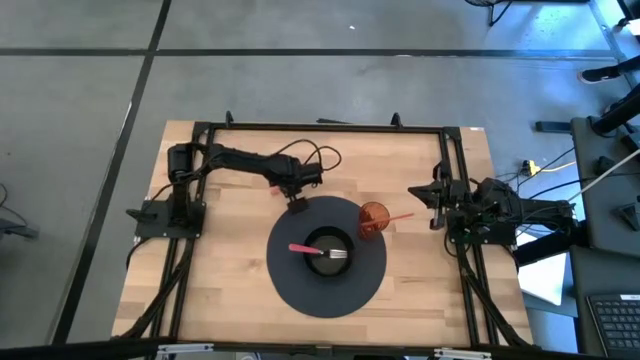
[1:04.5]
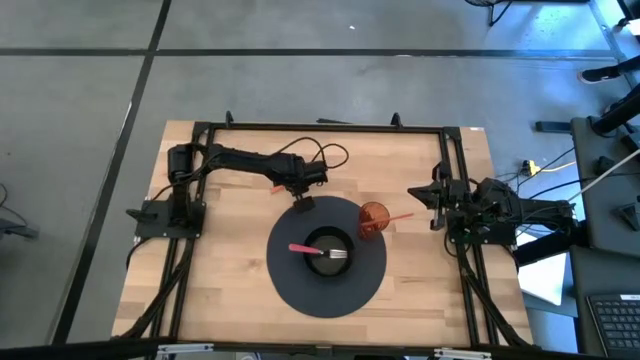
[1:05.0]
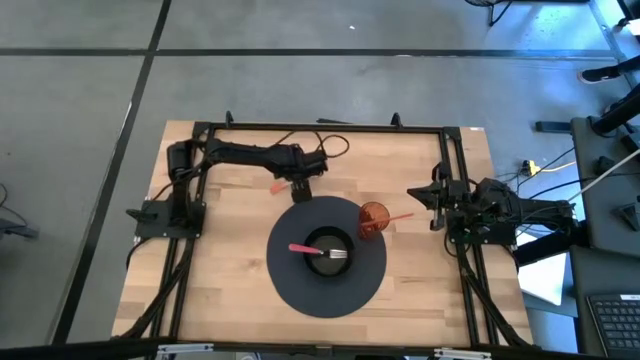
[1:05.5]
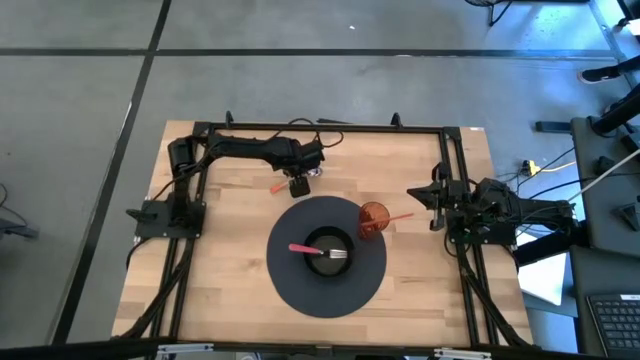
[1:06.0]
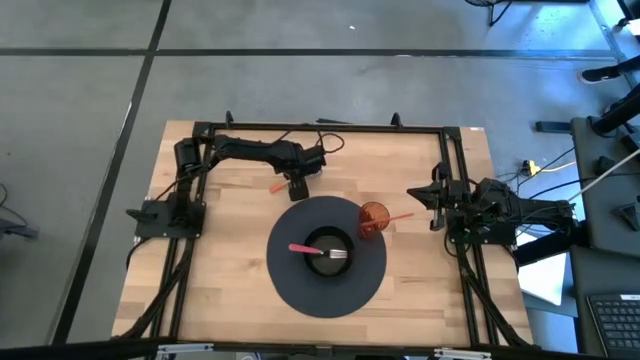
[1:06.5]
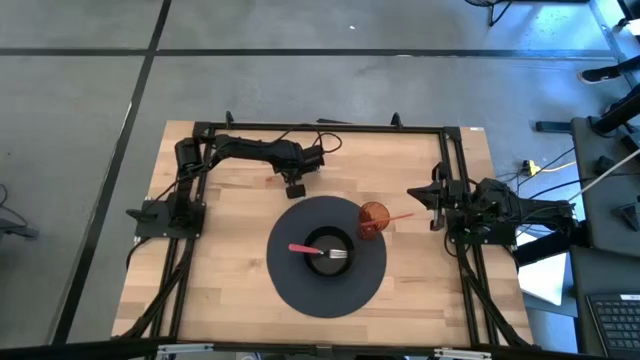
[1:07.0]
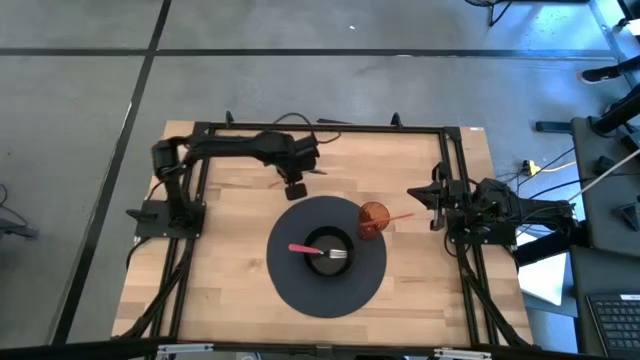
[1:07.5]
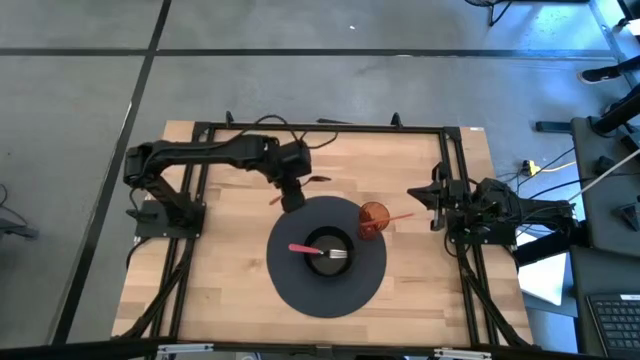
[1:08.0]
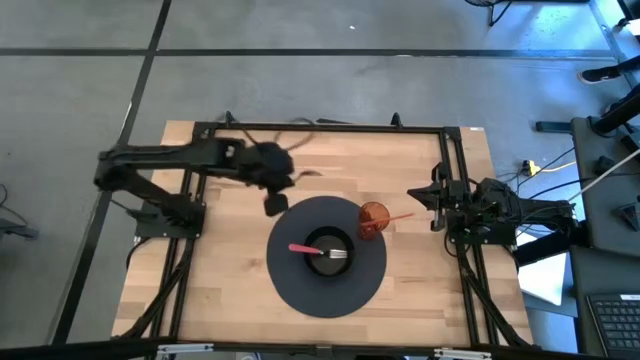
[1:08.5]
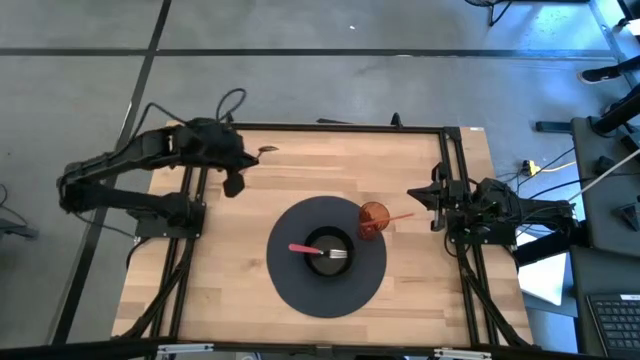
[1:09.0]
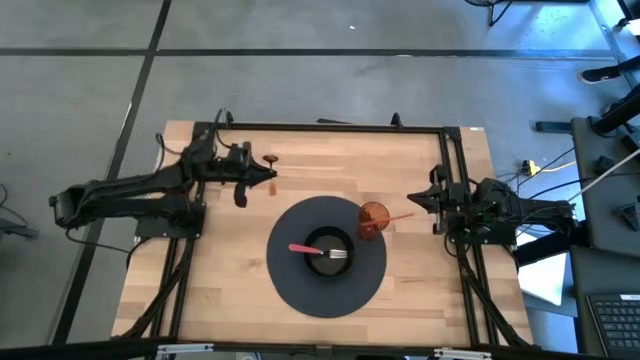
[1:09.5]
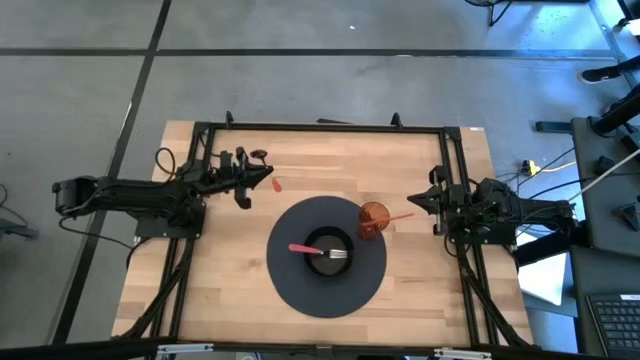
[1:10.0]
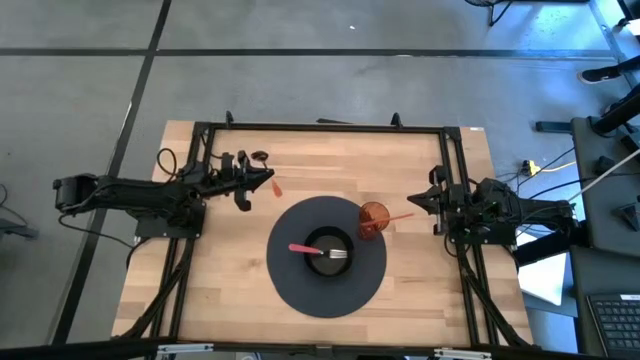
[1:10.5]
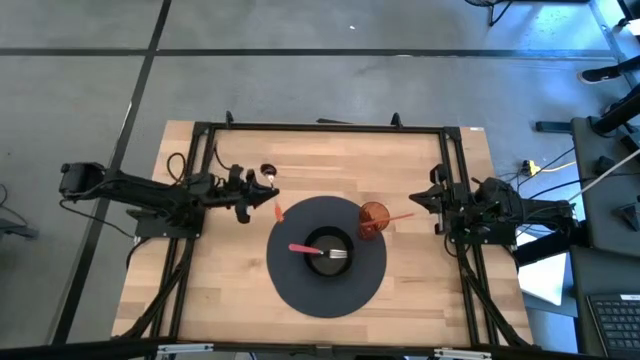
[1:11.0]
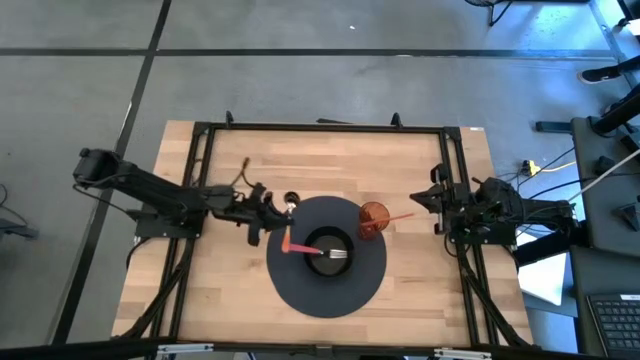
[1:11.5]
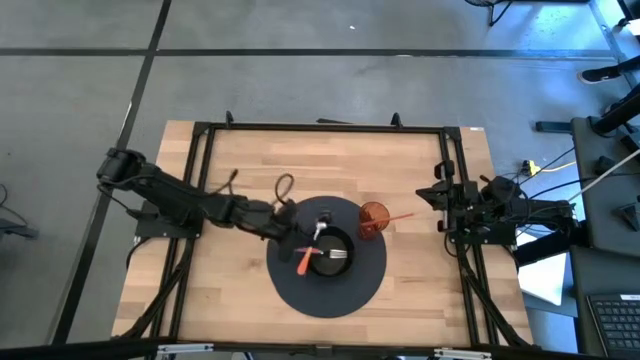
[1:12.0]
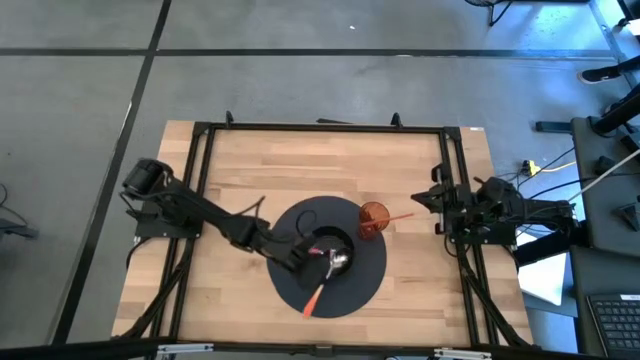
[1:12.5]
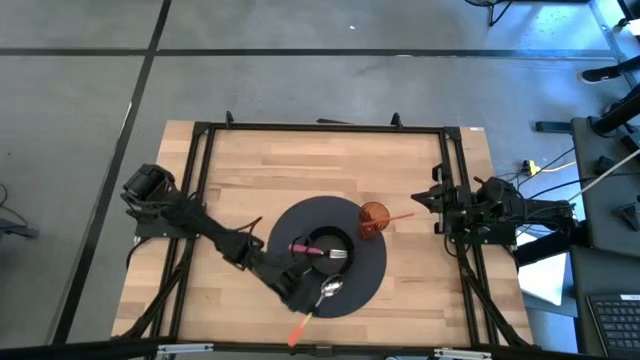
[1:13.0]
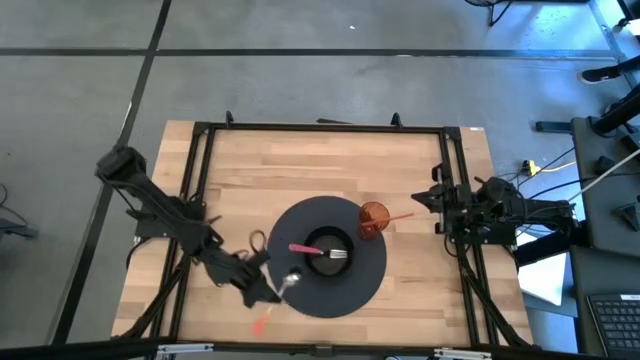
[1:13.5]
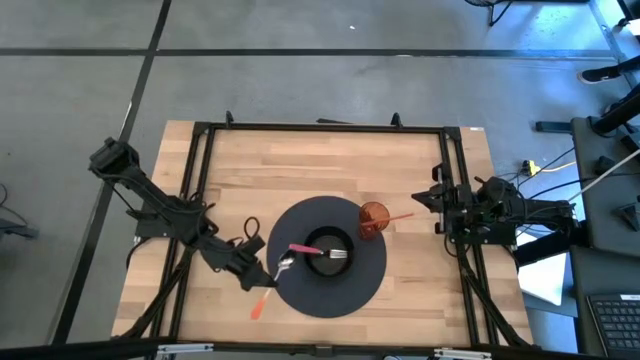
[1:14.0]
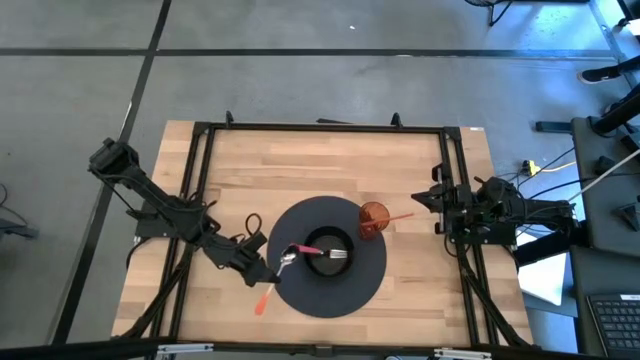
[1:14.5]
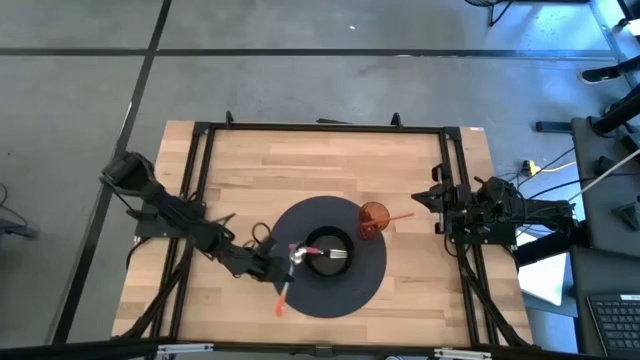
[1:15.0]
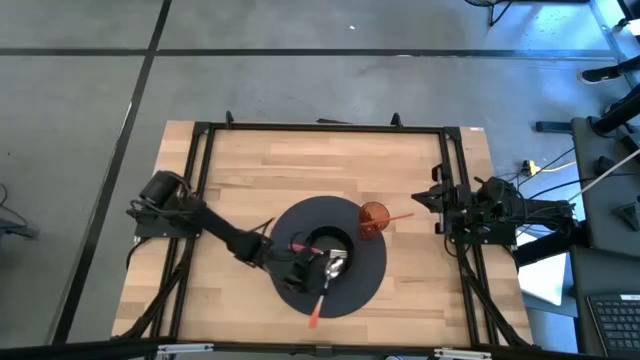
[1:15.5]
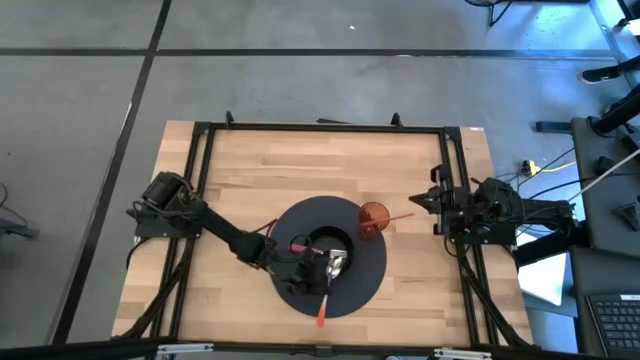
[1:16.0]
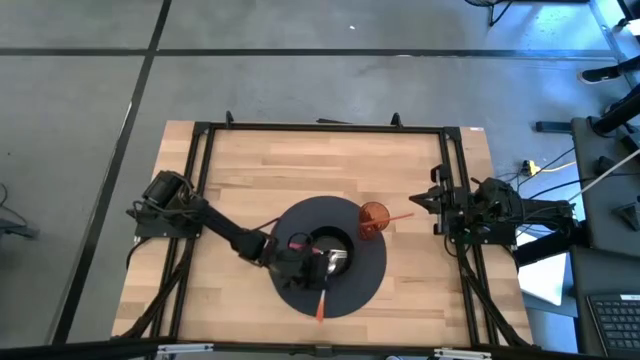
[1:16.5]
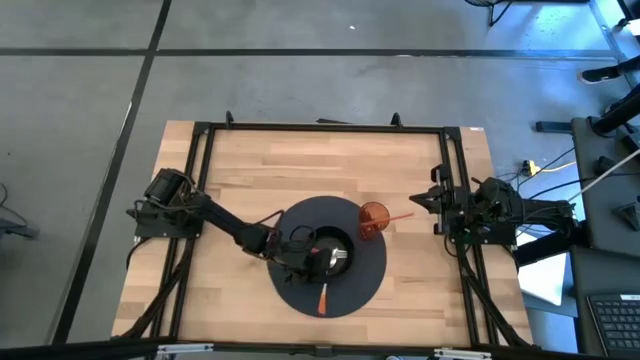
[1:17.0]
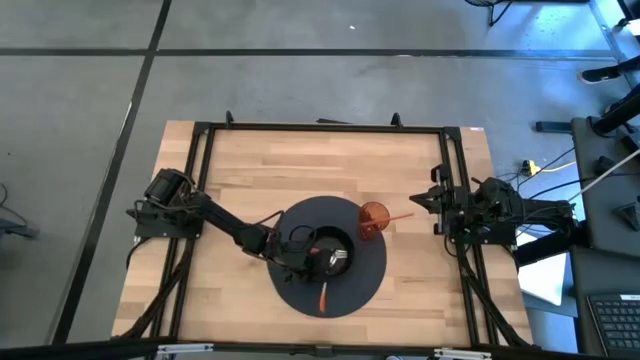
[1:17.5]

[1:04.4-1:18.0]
Task: Pick & Place Utensil
Put the orange spoon into the black bowl

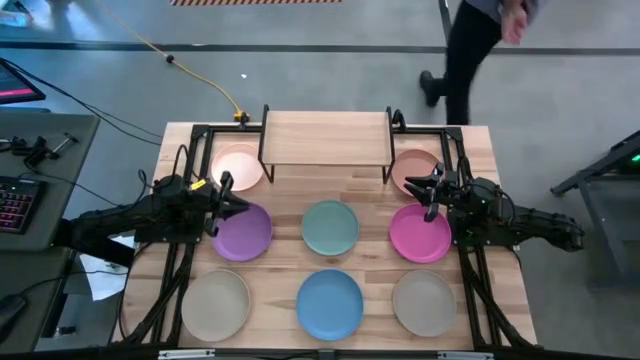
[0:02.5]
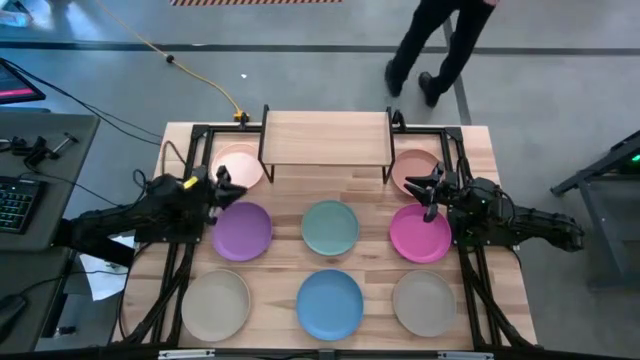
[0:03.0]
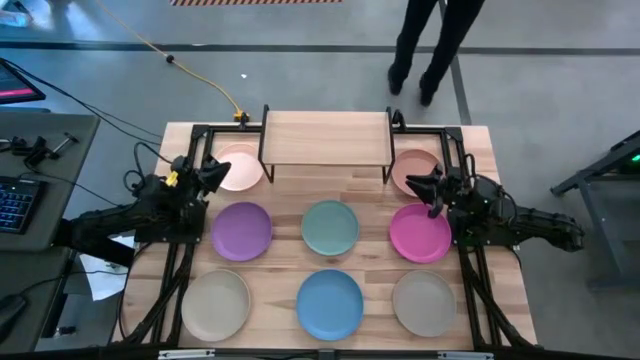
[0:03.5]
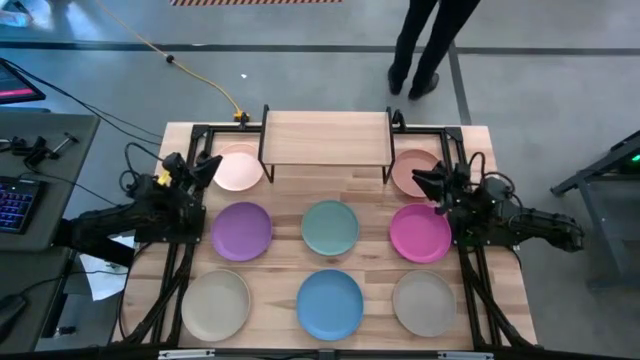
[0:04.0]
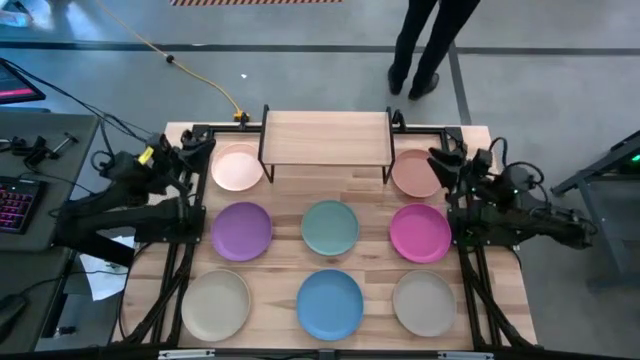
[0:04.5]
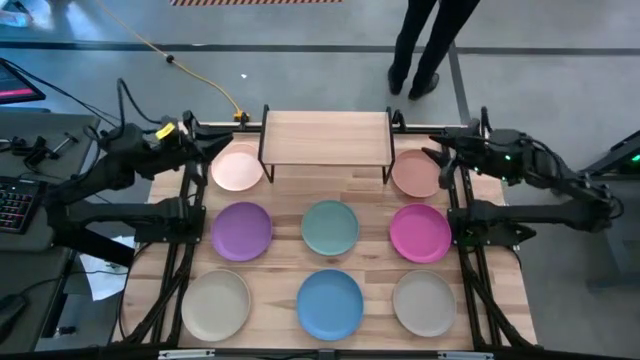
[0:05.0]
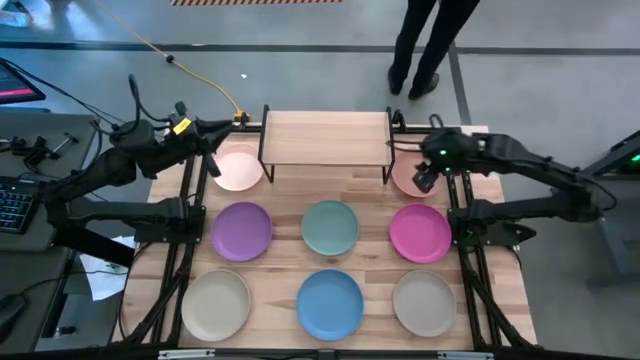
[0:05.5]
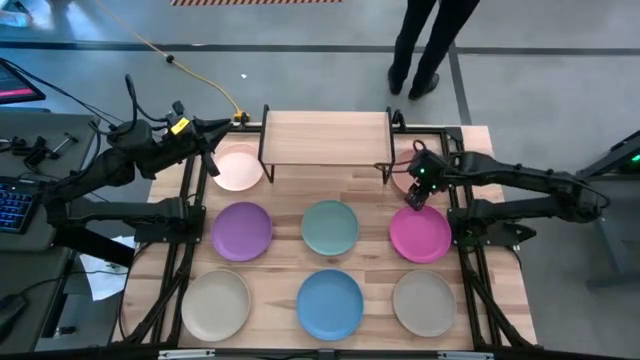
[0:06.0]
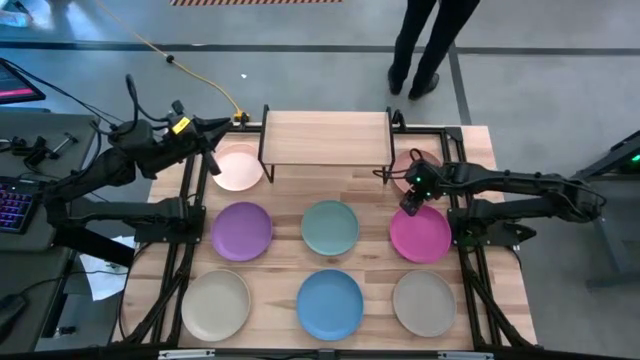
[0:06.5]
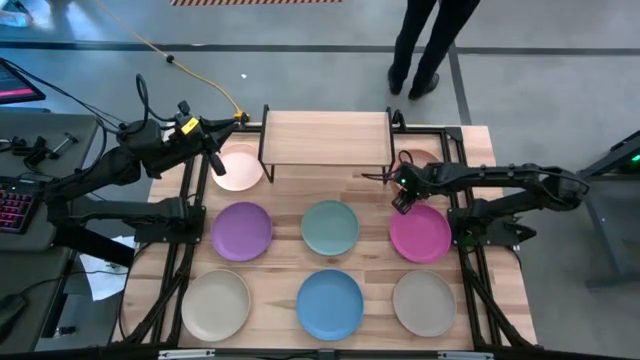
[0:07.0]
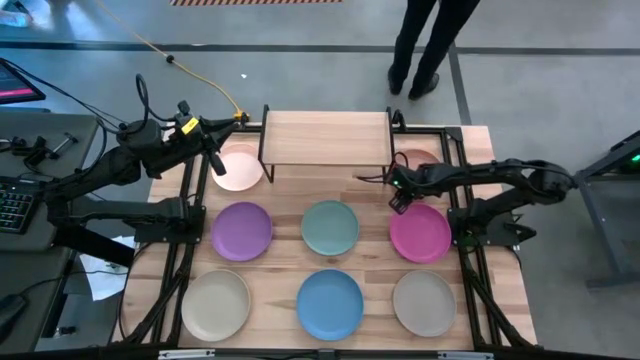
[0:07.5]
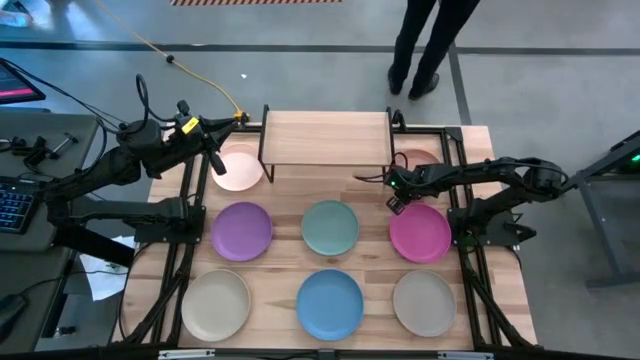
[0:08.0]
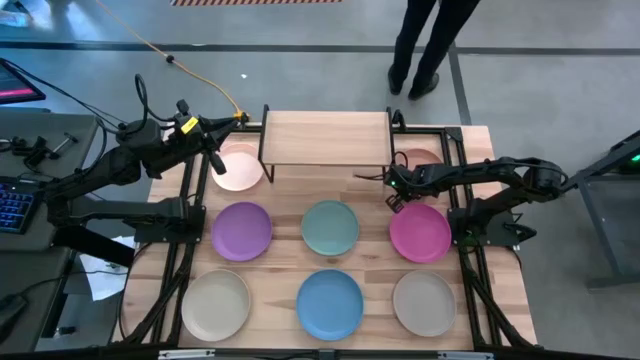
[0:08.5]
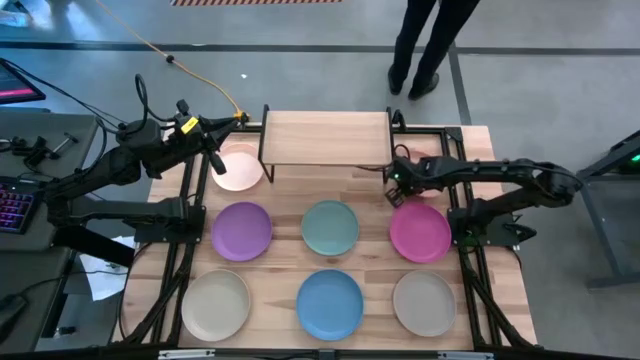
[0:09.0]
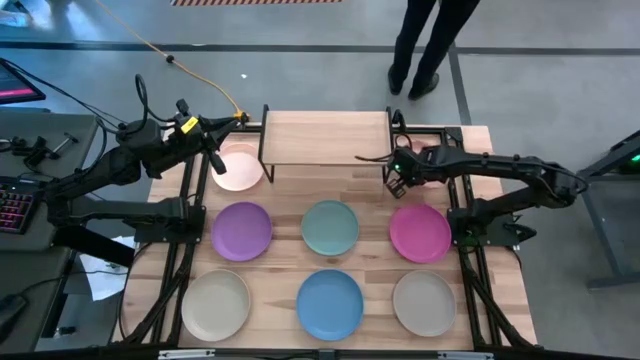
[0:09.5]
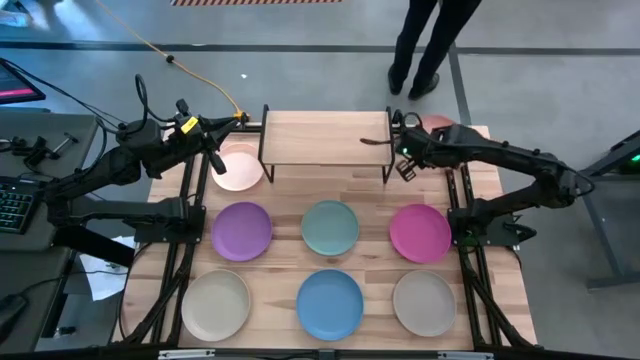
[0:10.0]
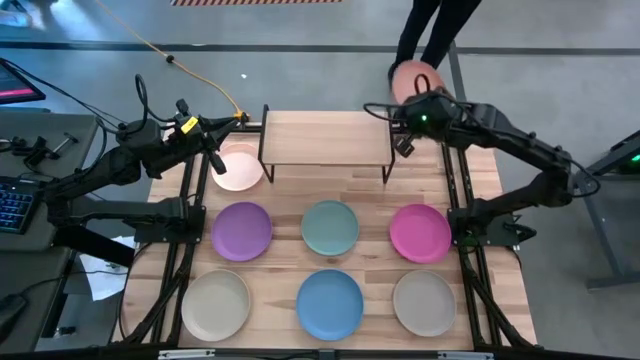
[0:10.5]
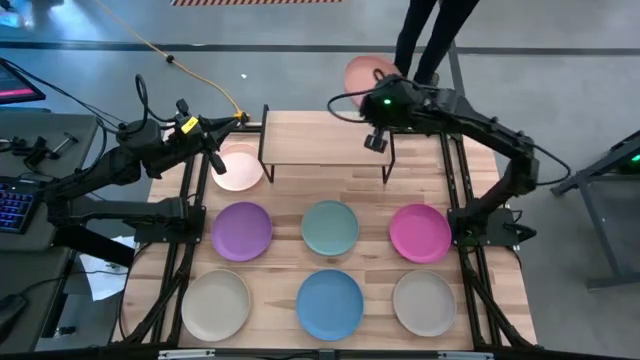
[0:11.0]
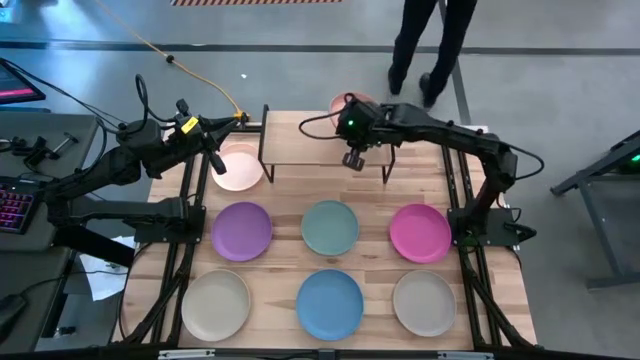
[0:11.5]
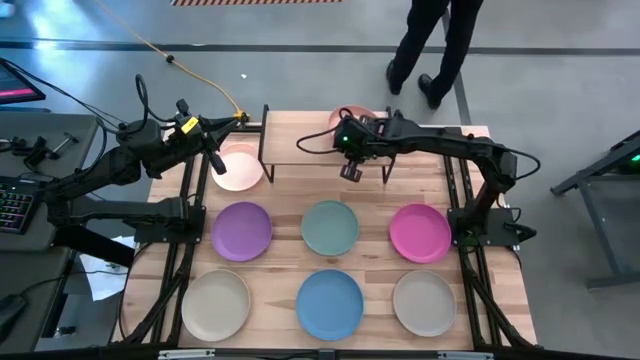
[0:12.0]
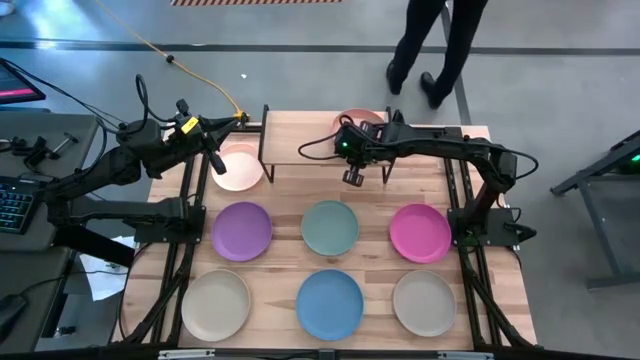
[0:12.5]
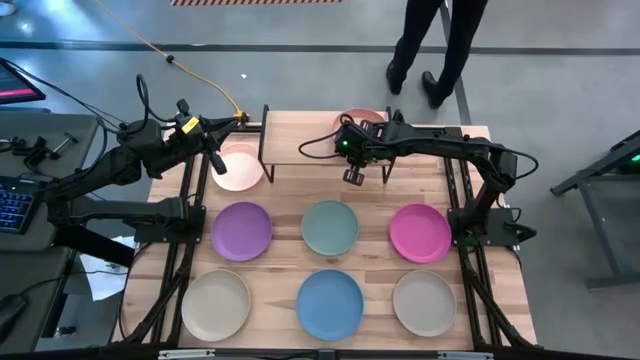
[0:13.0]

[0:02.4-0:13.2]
Task: Place and stack plates onto a shelf
Put the orange plate on the shelf
